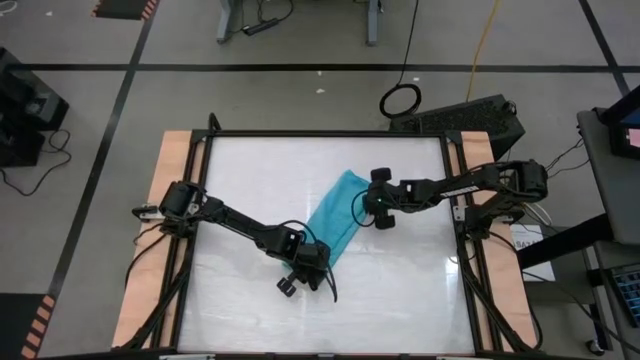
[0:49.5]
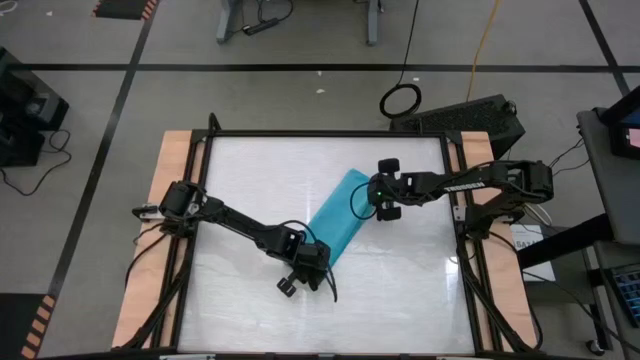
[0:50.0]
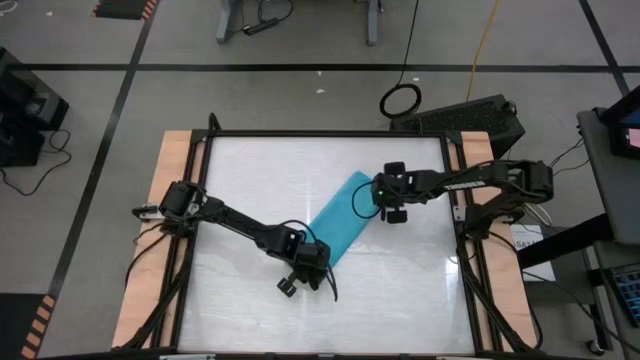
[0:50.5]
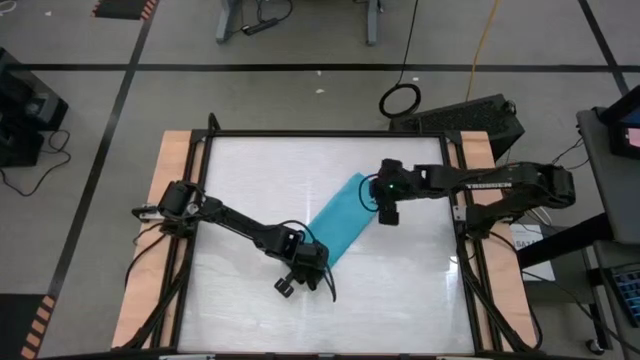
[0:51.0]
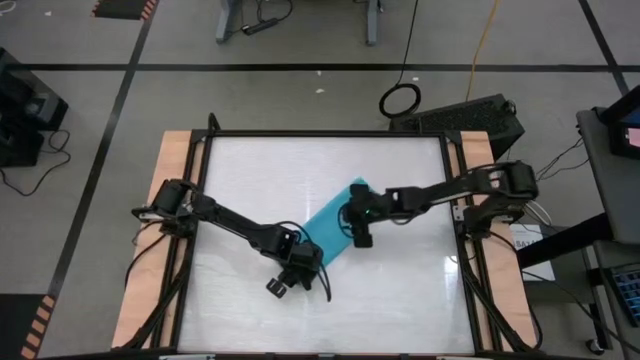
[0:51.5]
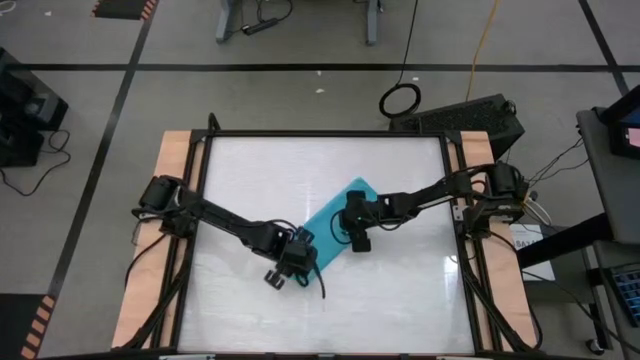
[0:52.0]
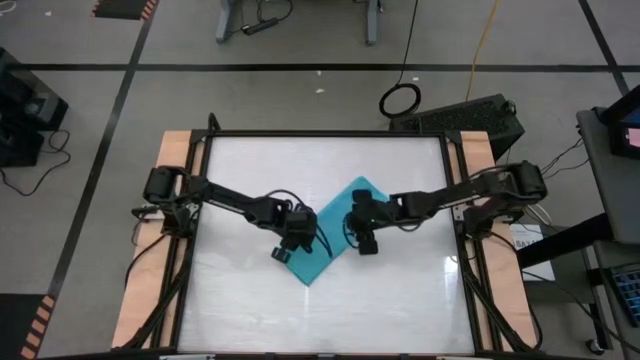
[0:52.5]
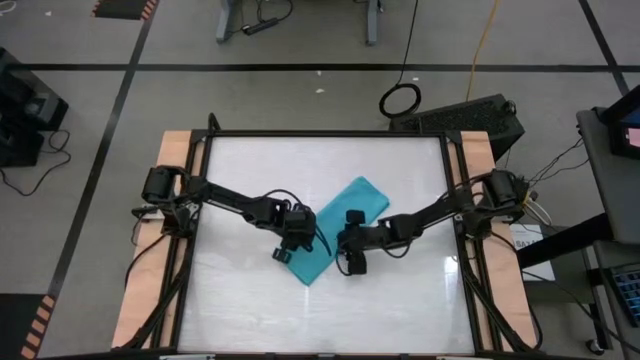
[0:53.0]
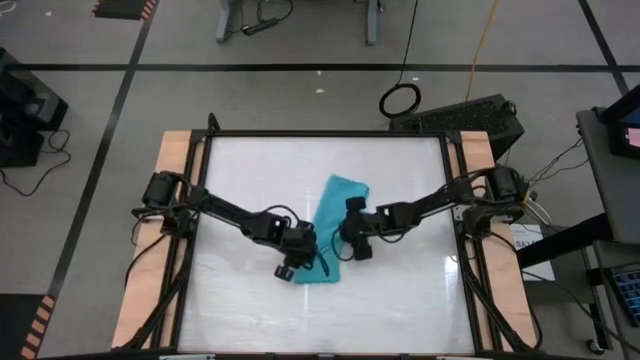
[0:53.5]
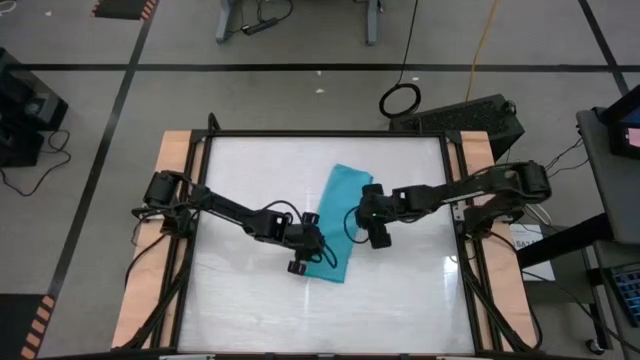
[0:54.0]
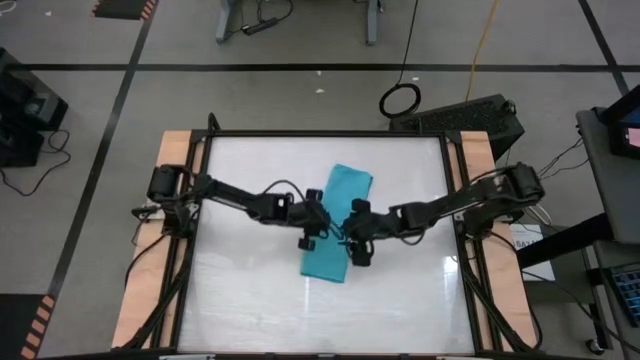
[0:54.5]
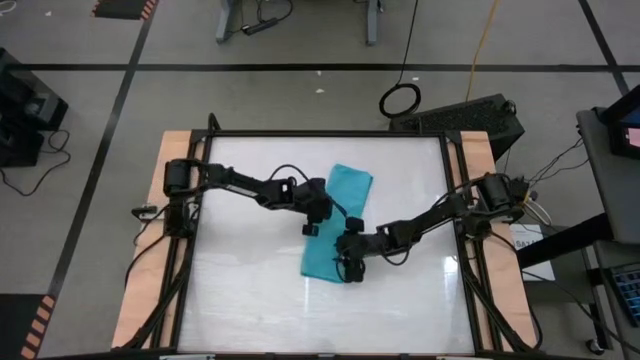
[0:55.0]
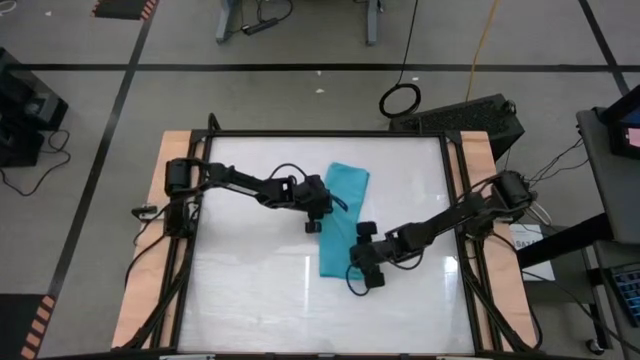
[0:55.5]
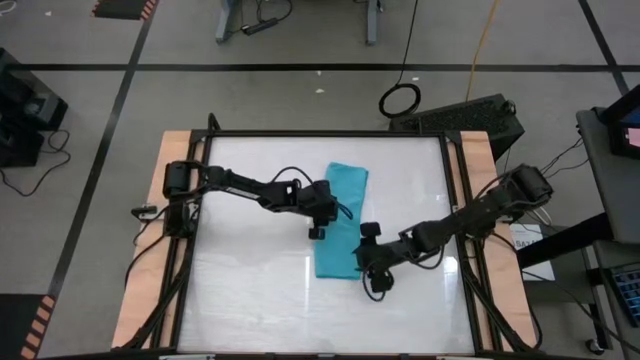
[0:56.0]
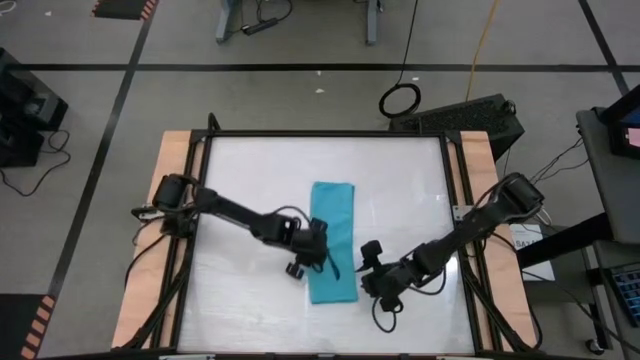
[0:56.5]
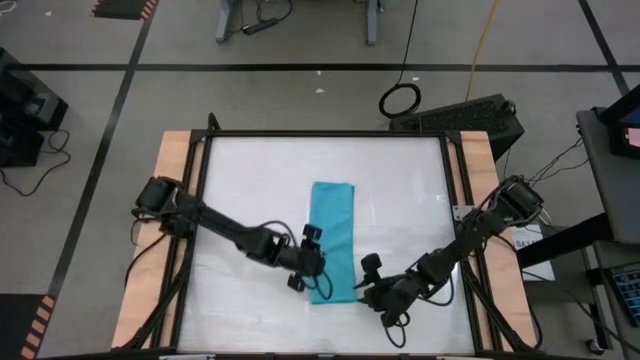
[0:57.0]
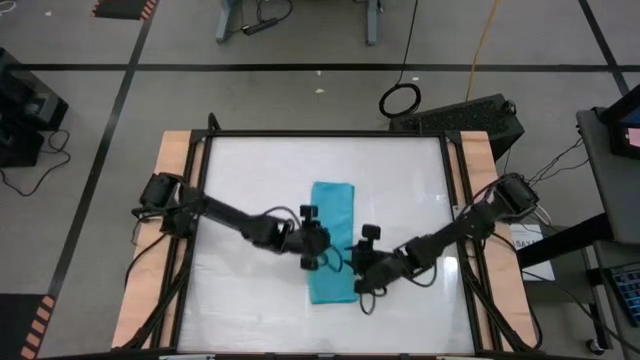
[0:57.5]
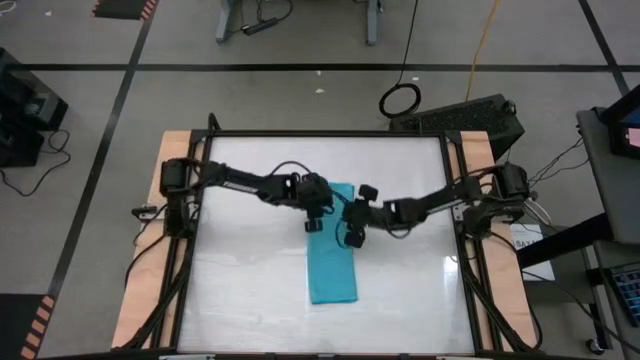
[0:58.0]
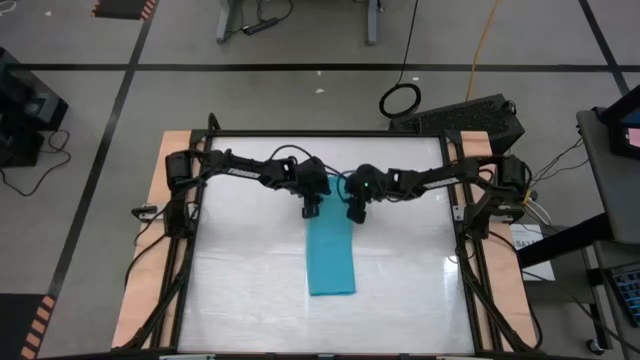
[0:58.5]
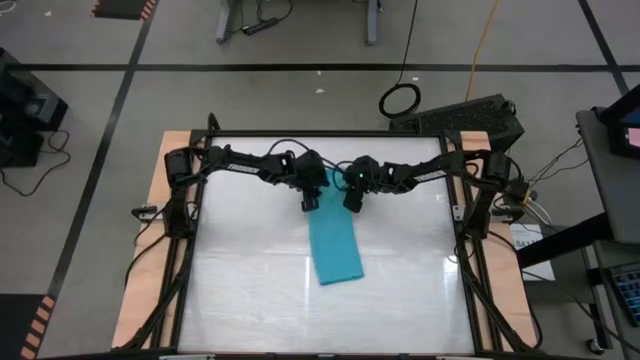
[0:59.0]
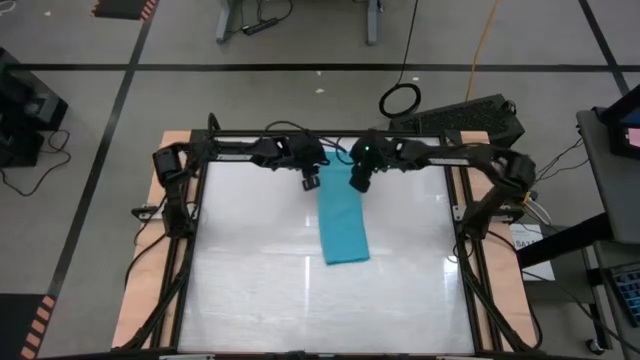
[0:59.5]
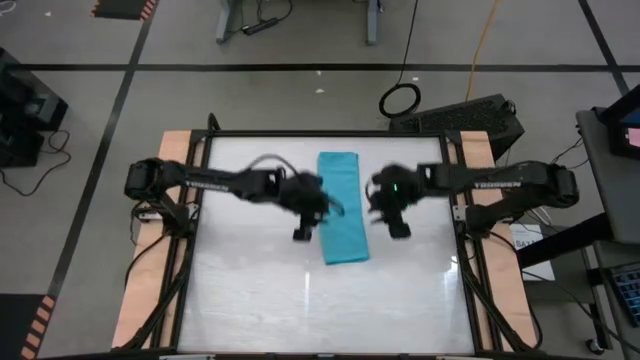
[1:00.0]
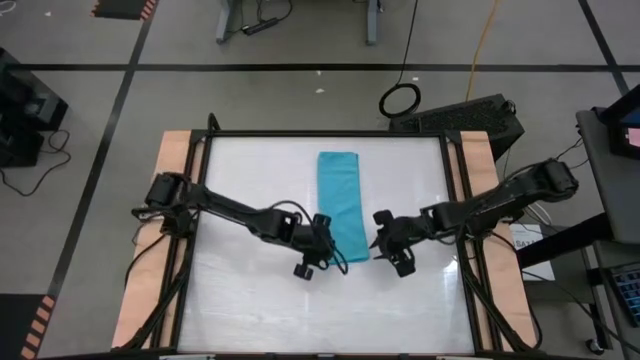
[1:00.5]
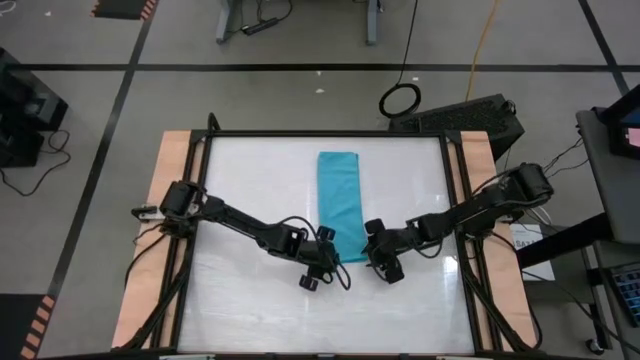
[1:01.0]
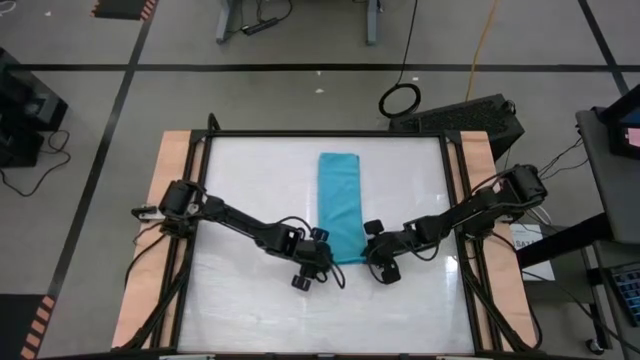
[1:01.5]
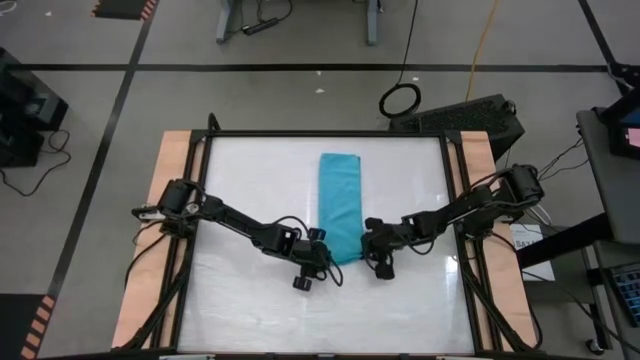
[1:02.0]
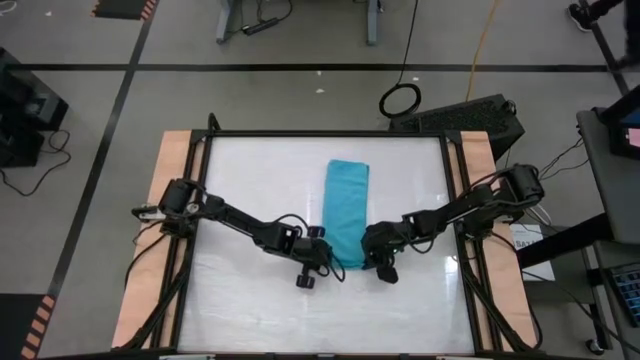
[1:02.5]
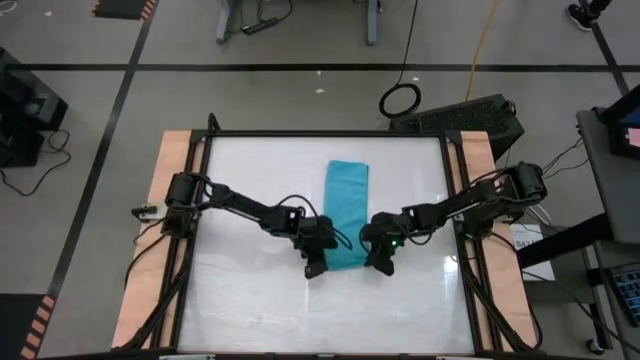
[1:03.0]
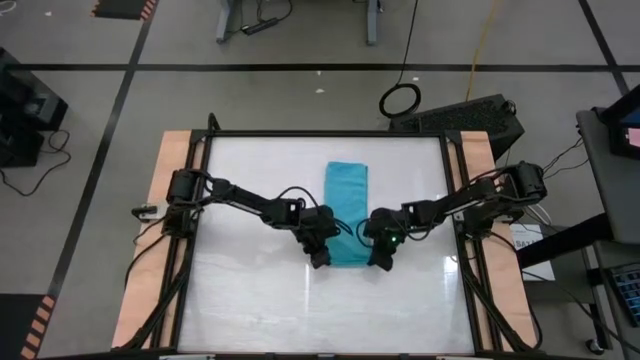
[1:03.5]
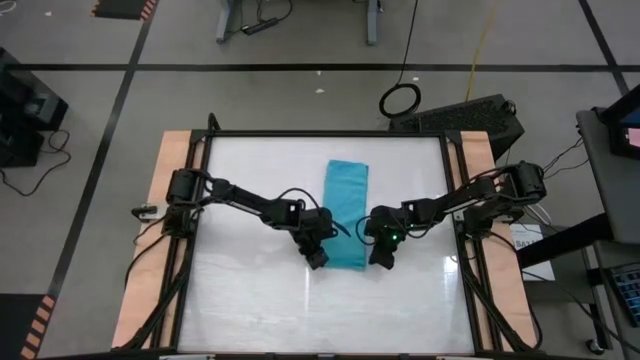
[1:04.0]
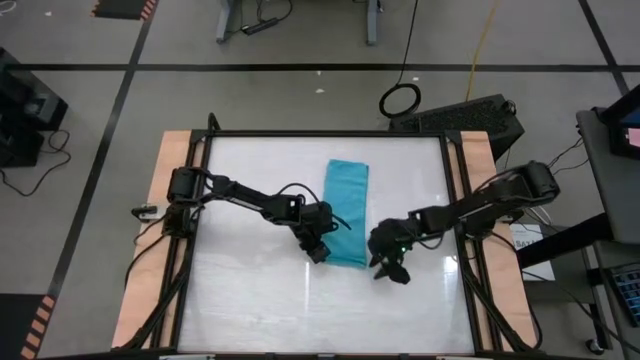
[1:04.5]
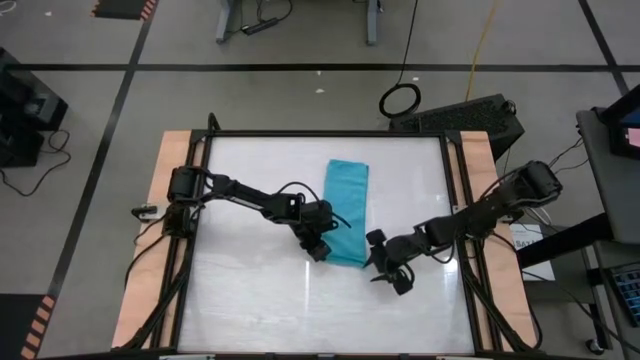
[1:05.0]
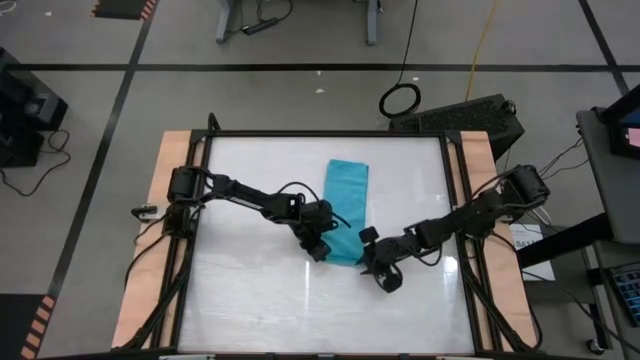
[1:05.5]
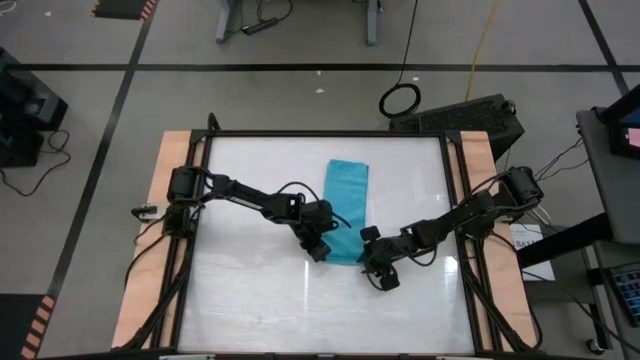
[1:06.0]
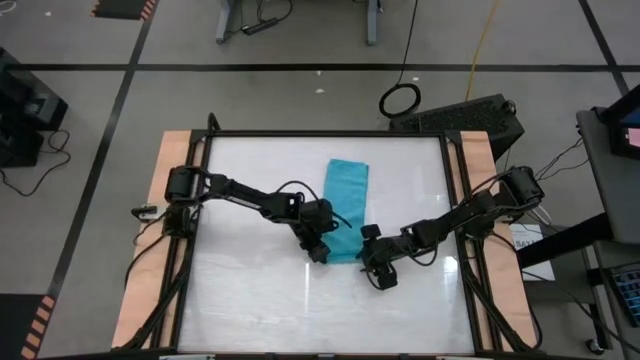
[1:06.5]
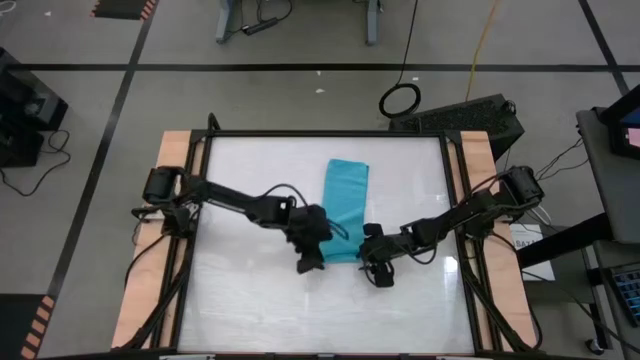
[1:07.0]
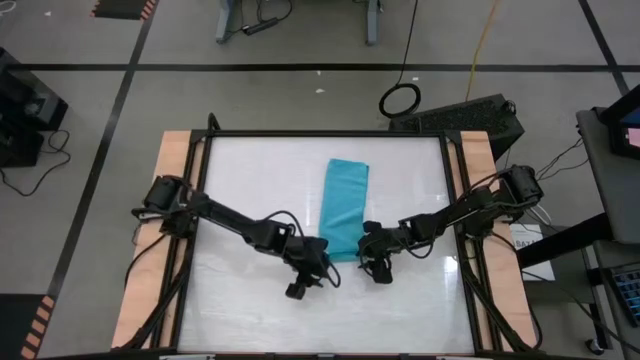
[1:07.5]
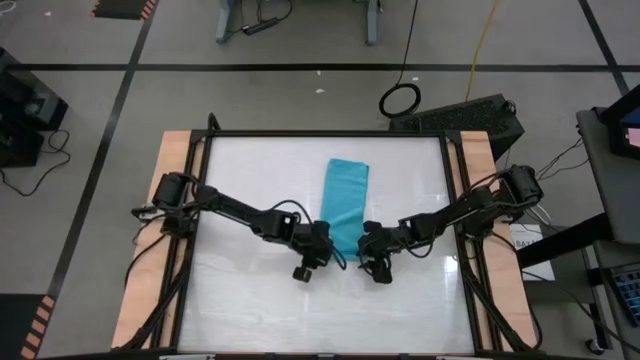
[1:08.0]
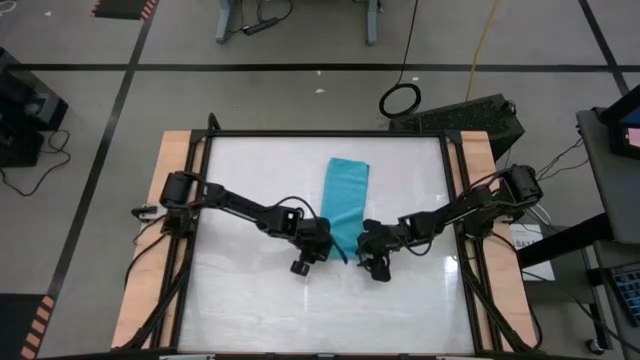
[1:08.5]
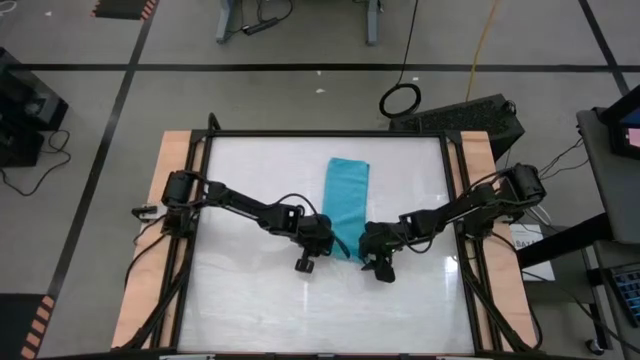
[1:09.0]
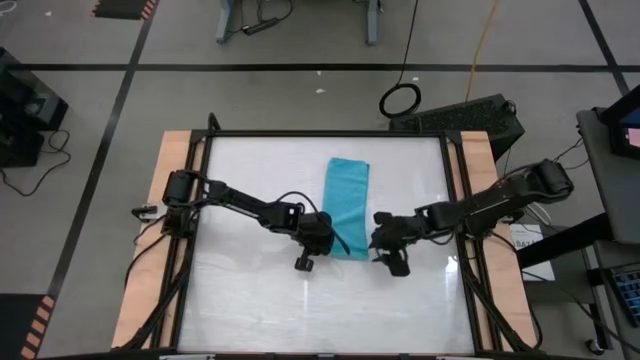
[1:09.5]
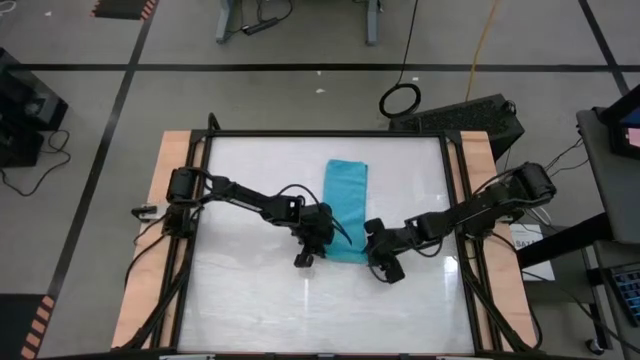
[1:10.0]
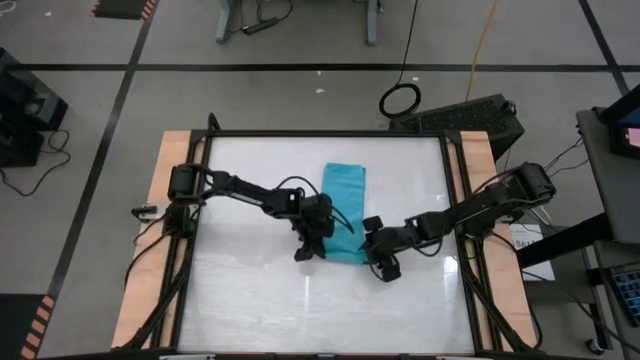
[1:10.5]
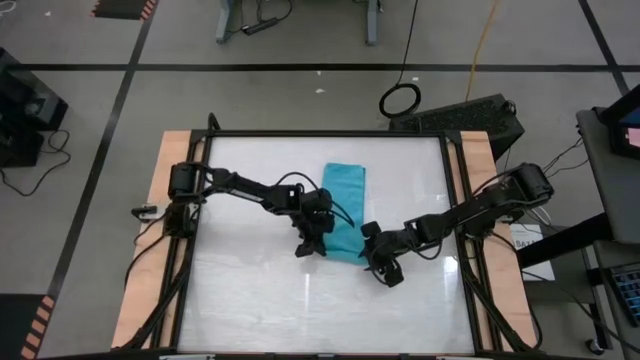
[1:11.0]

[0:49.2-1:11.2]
Task: Roll towel
Roll the blue towel
